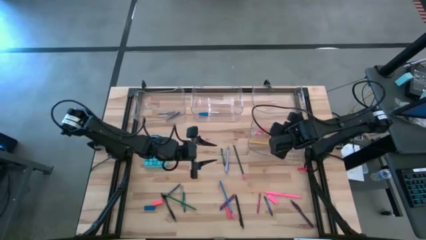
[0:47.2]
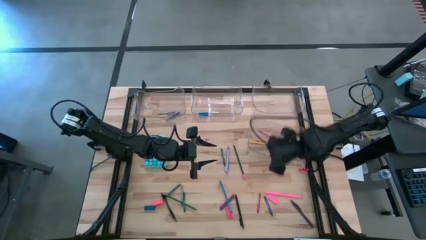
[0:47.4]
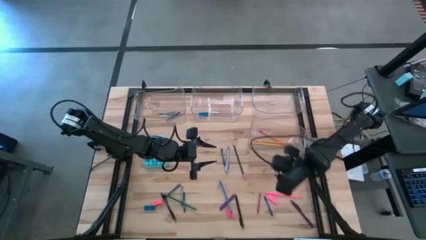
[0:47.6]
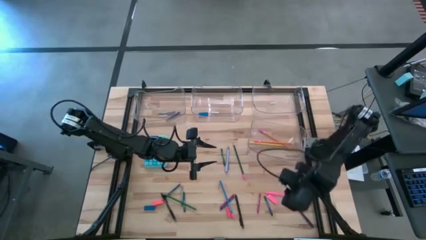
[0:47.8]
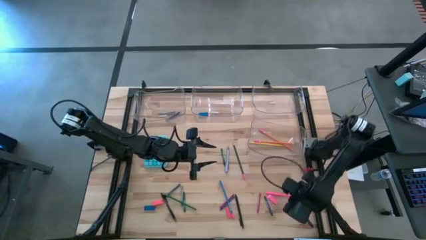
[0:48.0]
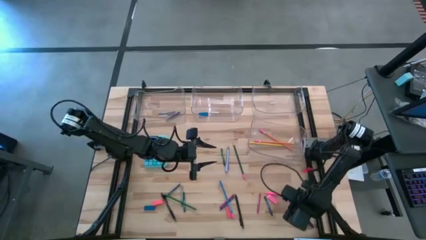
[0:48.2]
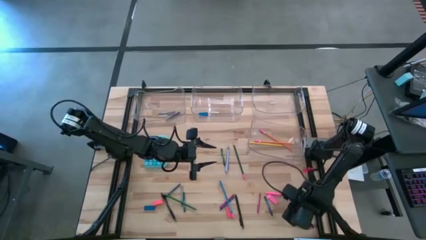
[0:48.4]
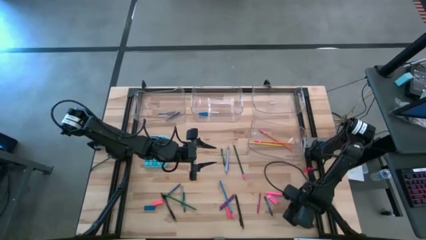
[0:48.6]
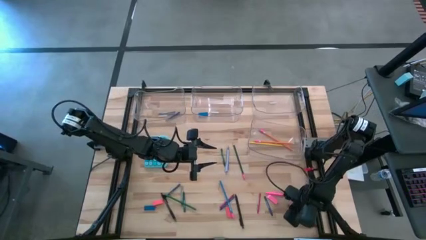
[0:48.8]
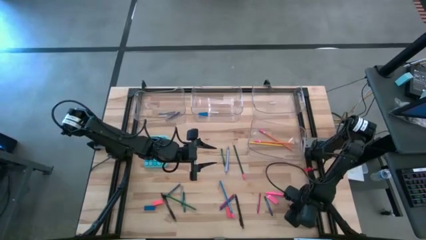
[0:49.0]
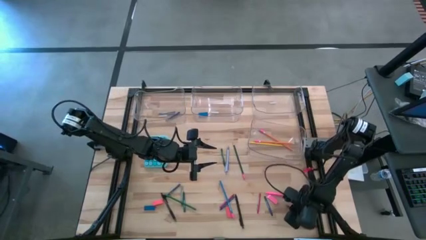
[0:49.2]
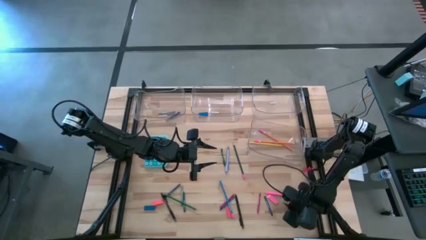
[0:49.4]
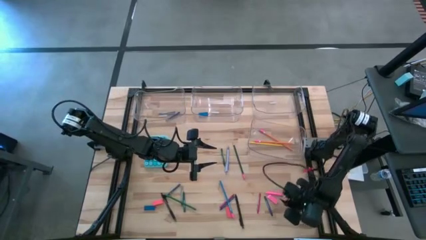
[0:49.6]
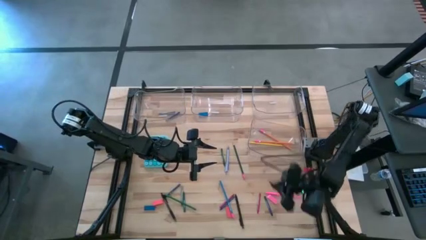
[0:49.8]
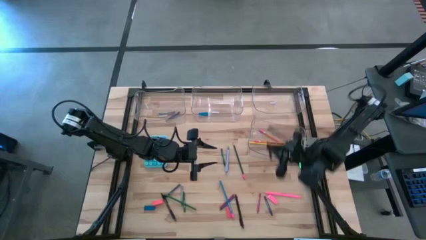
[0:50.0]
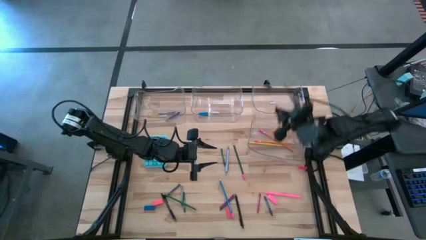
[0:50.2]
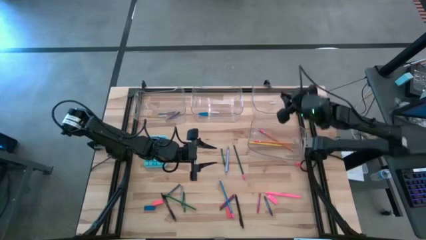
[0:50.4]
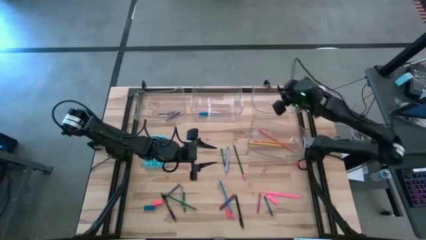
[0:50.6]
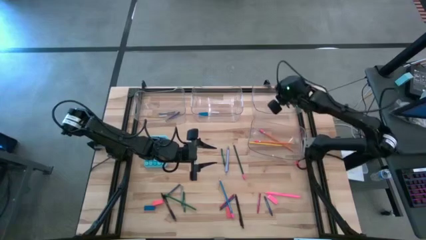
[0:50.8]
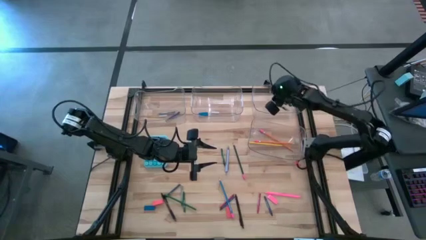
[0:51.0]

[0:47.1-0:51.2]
Task: Sort crayons/erasers/pens/pencils in bins
Put the purple pen into the top right transparent bin

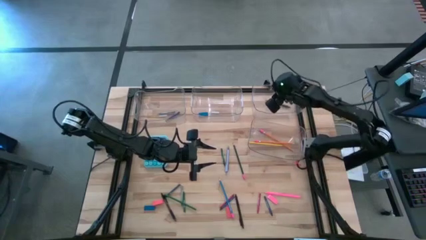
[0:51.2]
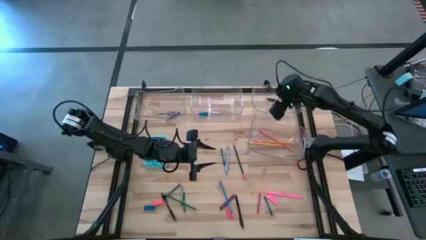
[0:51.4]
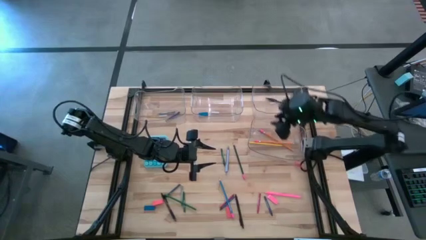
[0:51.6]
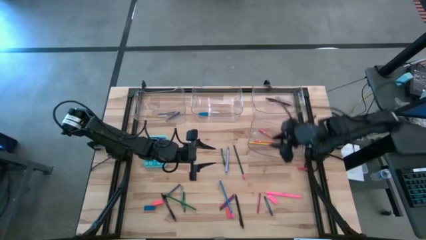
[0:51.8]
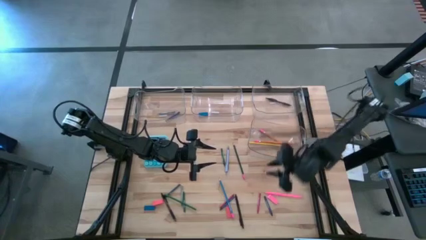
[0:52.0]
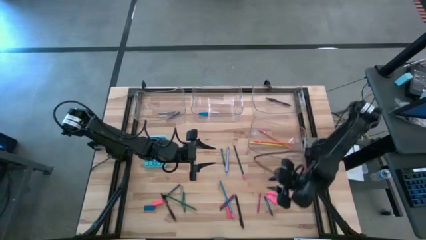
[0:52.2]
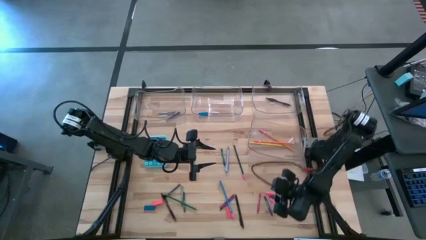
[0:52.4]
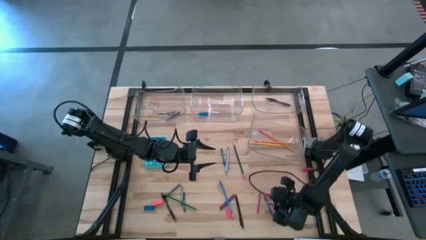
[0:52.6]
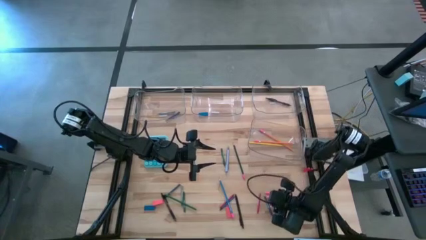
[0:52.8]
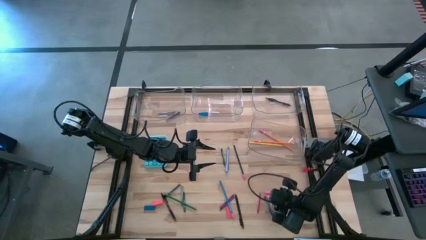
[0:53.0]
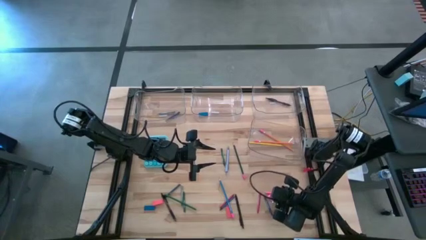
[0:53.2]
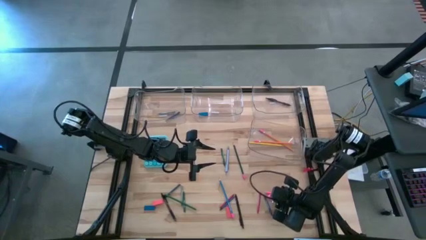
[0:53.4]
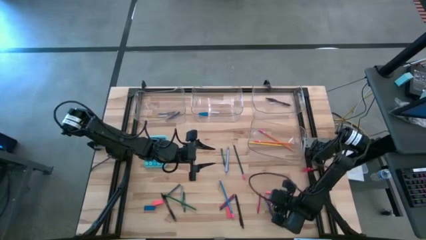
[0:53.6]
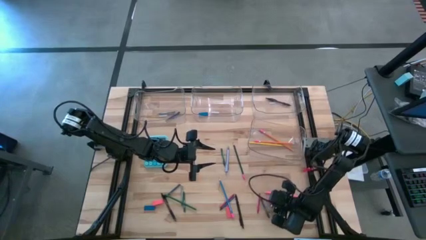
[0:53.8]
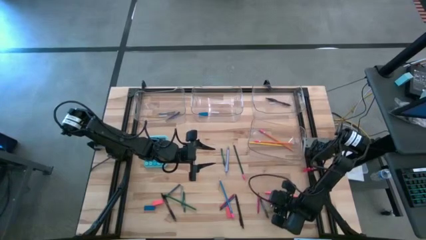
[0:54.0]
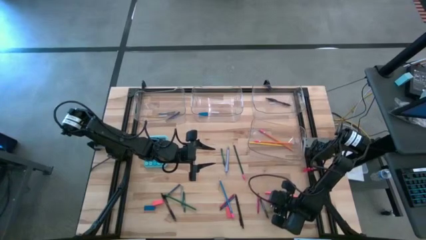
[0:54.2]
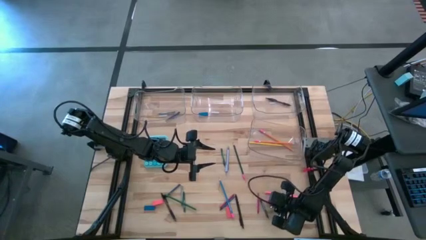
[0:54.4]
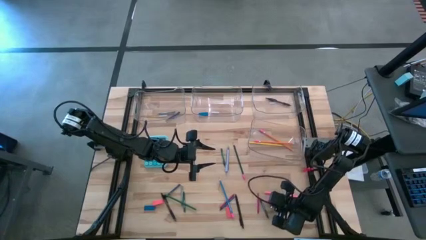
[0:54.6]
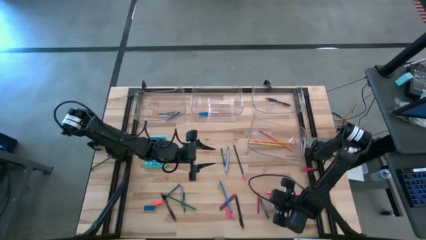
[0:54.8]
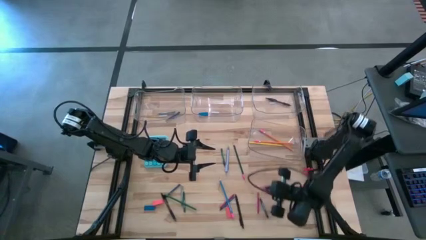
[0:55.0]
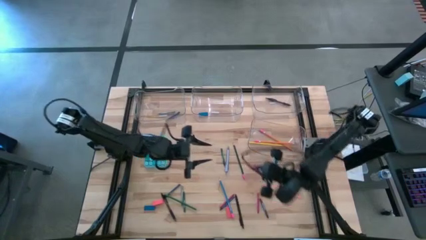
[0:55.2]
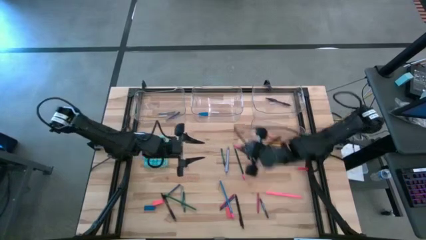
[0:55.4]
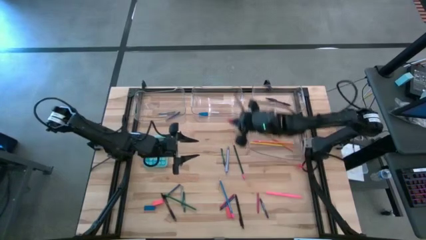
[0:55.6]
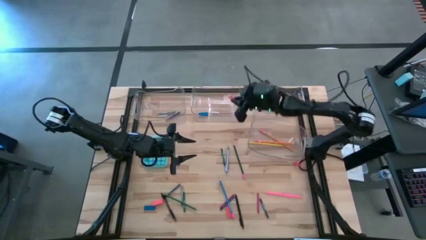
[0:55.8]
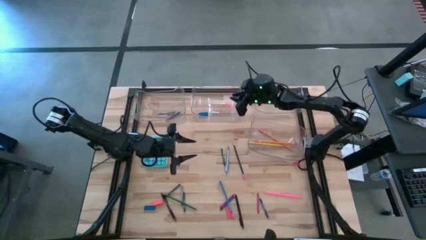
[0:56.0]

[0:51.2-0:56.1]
Put the pink eraser into the top center transparent bin

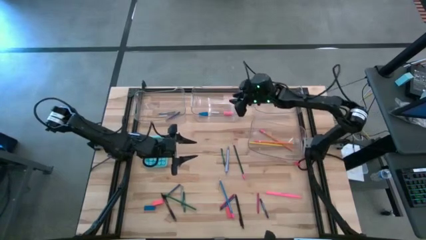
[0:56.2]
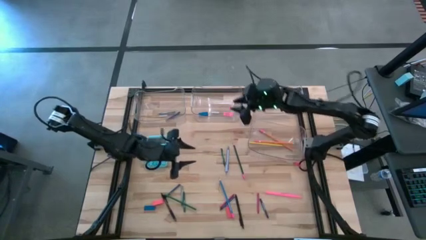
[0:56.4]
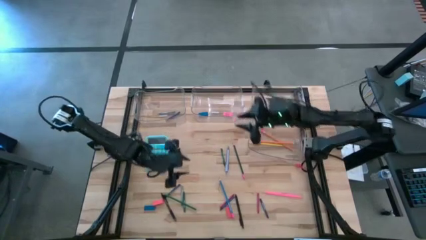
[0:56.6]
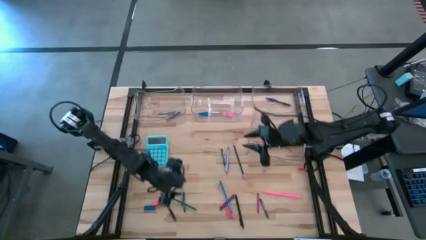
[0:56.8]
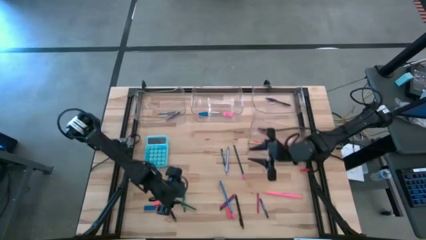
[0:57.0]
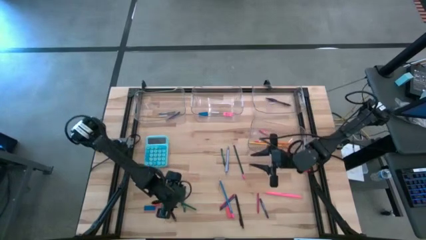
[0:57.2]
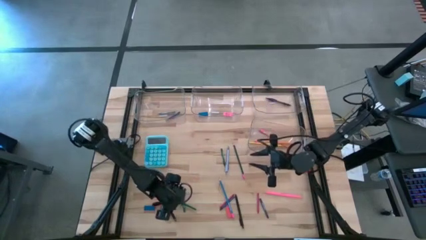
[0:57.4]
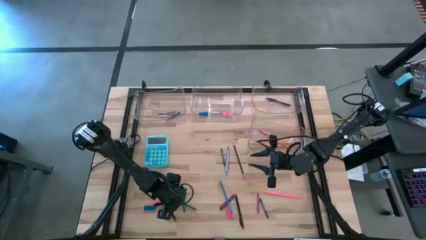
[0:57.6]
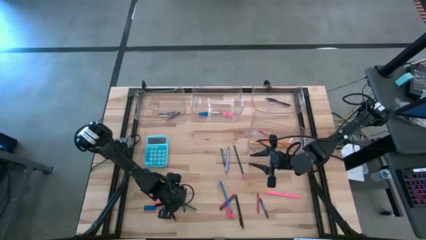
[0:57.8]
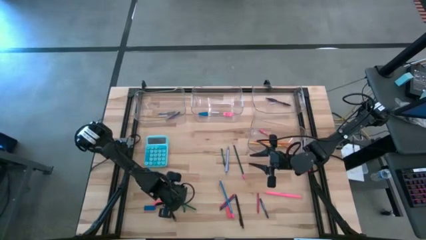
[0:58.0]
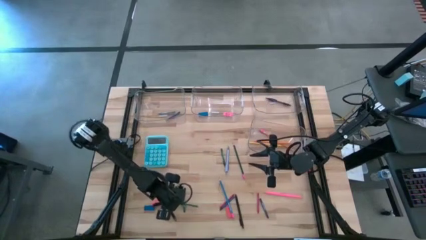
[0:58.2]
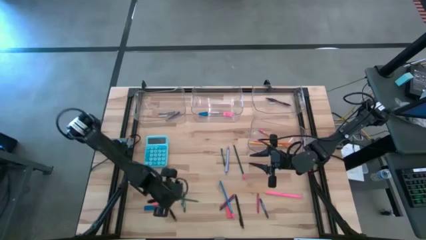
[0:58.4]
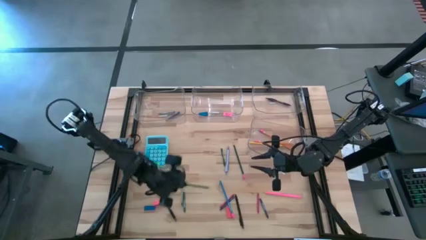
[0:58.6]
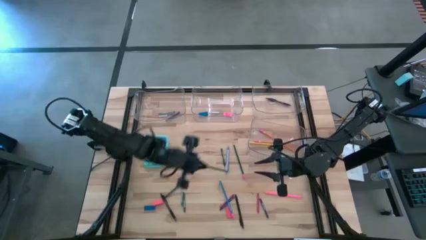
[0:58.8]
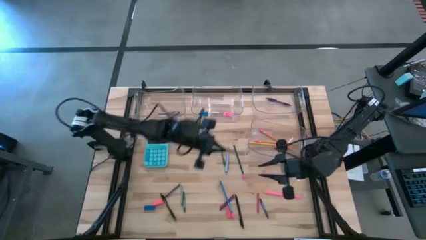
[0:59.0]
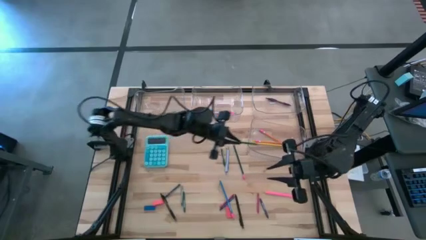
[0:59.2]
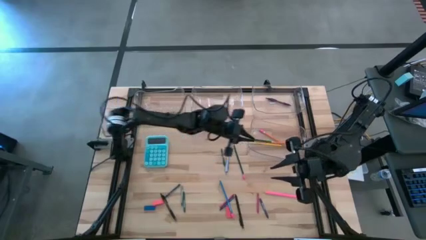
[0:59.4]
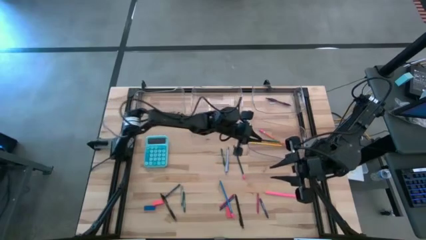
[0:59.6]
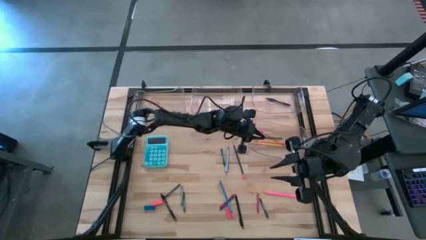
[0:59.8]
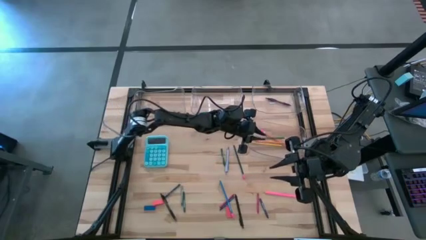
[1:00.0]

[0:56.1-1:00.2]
Put the green colored pencil into the bottom transparent bin

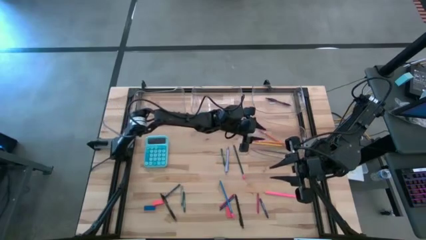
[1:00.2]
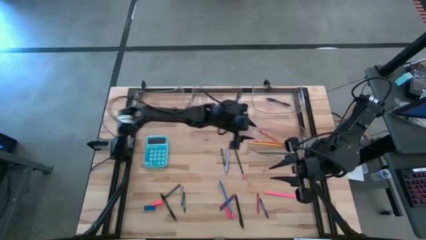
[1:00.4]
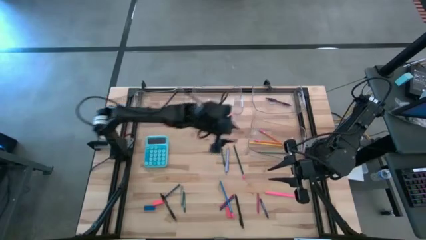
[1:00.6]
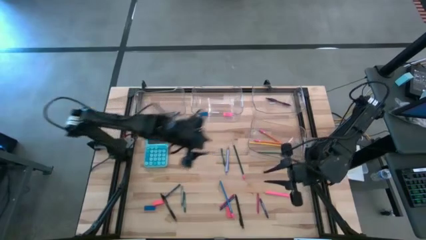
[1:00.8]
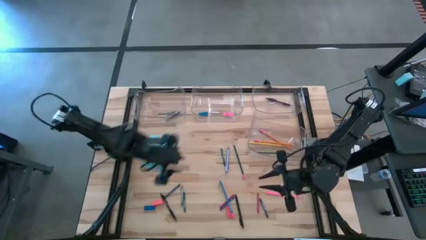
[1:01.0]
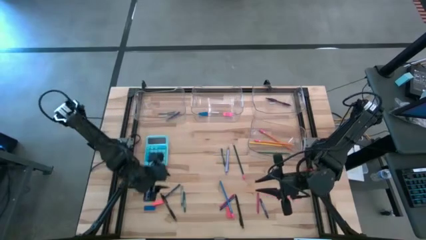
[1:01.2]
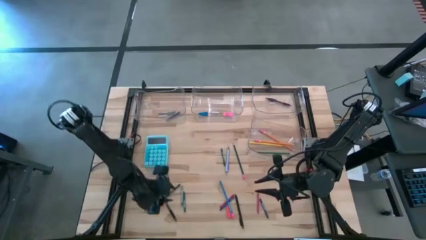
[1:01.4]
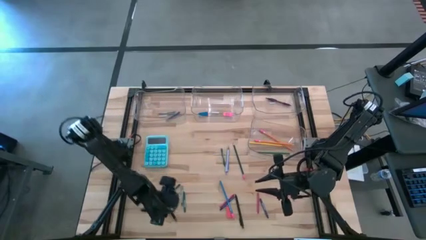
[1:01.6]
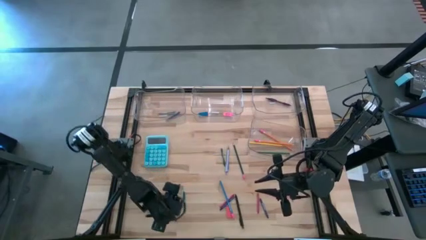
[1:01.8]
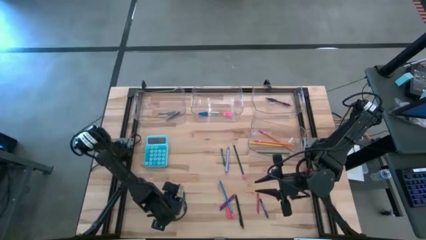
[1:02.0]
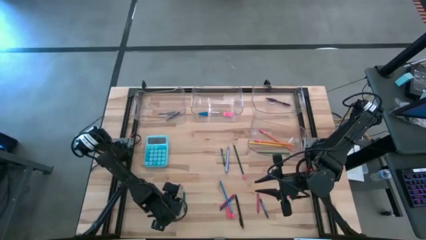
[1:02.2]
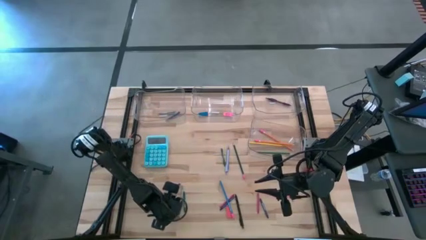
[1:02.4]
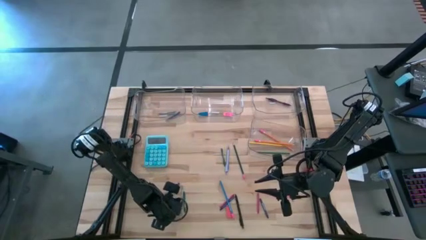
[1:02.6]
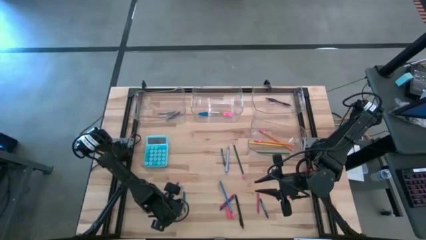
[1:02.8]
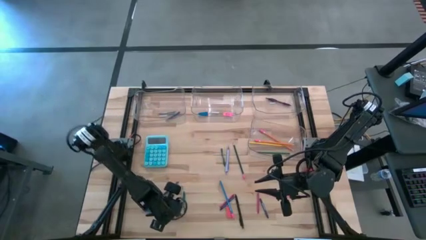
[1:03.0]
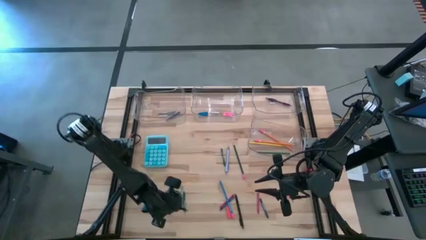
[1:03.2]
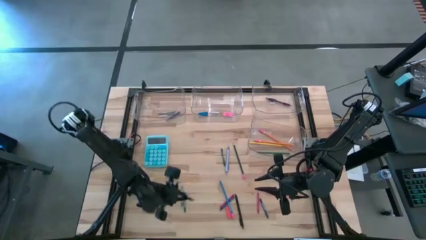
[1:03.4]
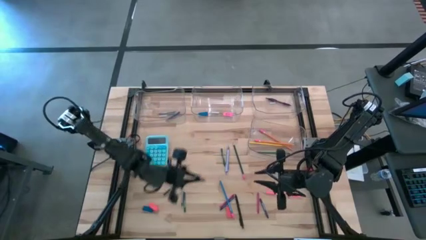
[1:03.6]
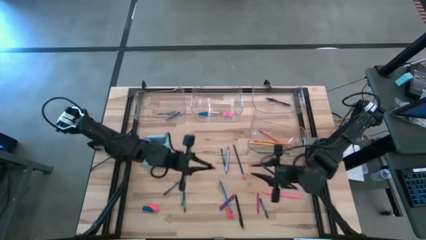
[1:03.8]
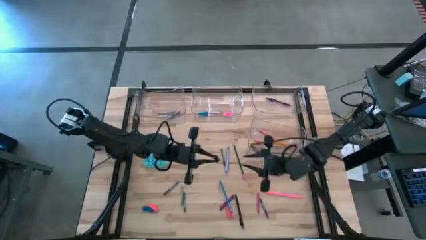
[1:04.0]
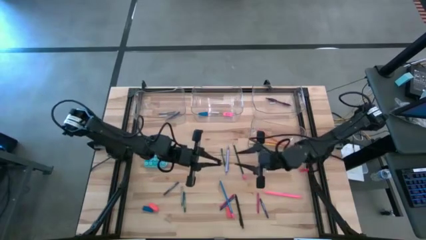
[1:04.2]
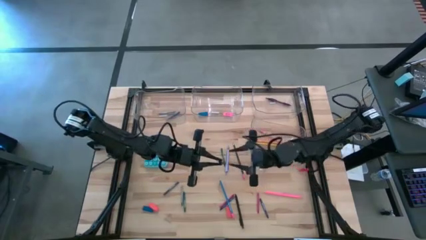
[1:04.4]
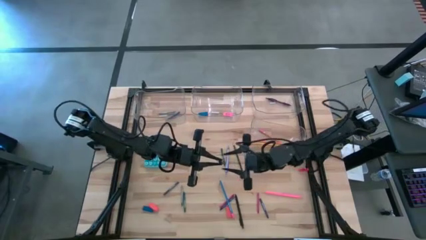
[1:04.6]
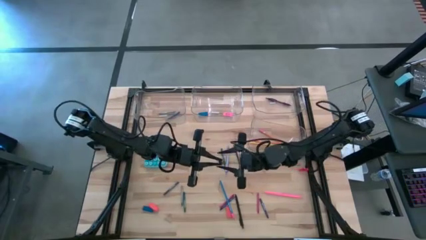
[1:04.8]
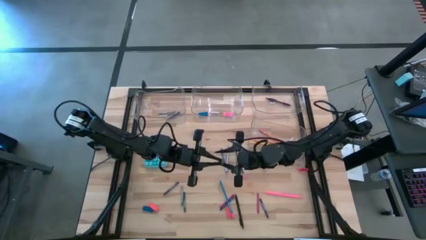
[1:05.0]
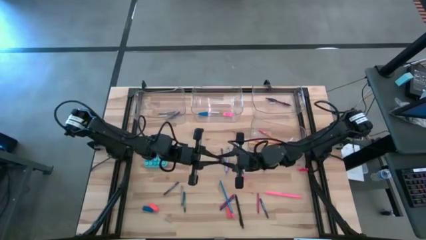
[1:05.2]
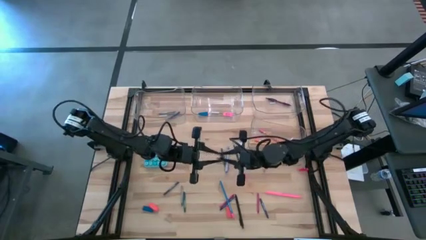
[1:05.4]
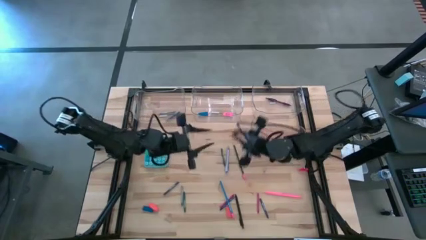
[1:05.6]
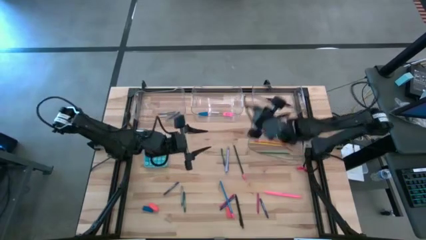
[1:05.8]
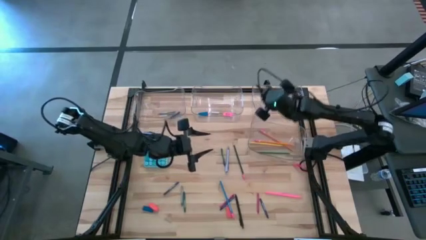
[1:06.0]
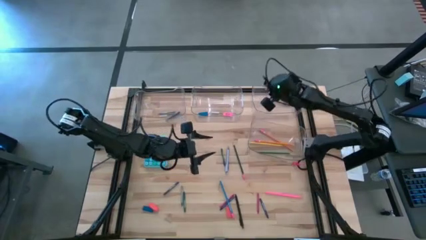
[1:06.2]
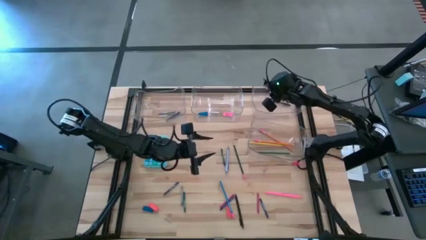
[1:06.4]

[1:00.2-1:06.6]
Put the left black pen into the top right transparent bin
